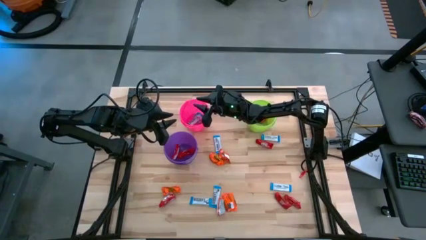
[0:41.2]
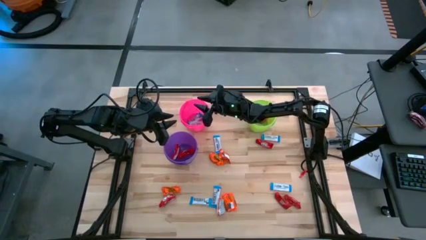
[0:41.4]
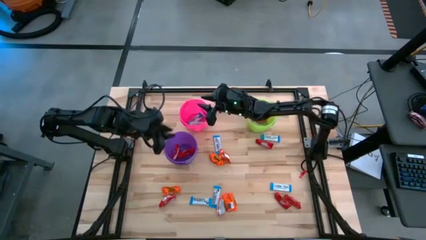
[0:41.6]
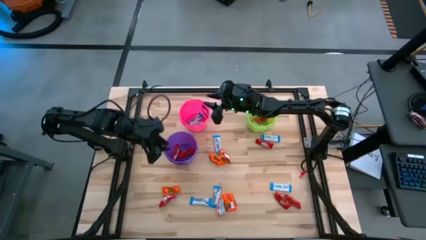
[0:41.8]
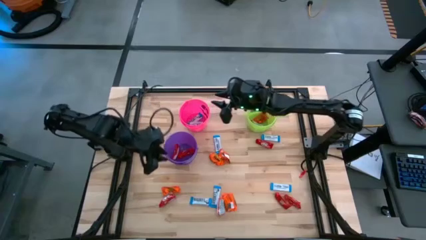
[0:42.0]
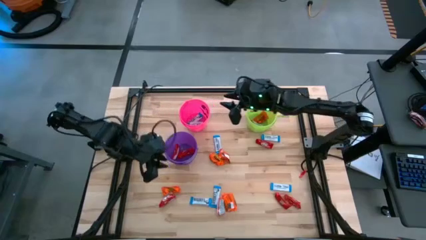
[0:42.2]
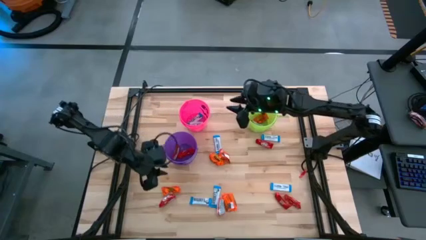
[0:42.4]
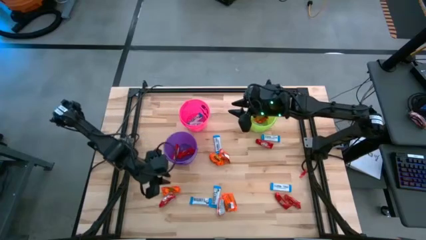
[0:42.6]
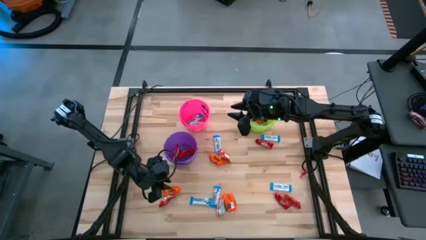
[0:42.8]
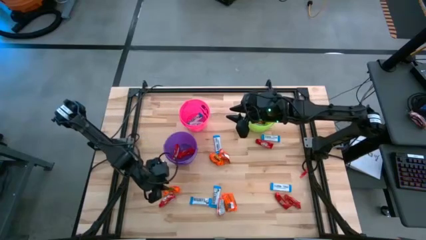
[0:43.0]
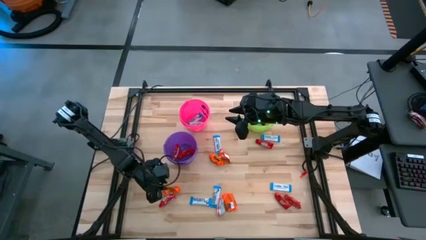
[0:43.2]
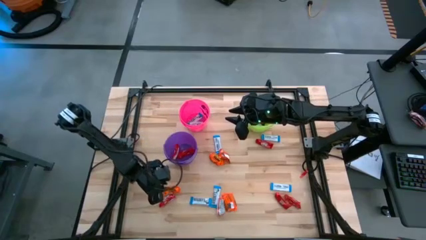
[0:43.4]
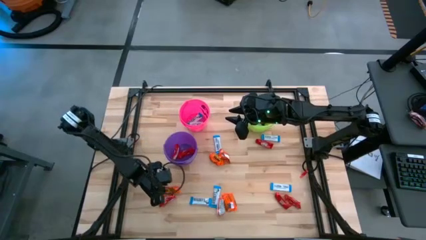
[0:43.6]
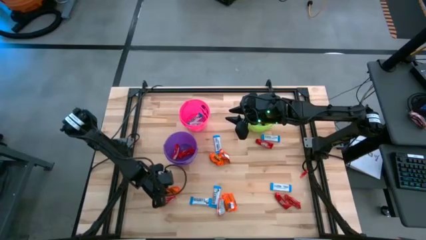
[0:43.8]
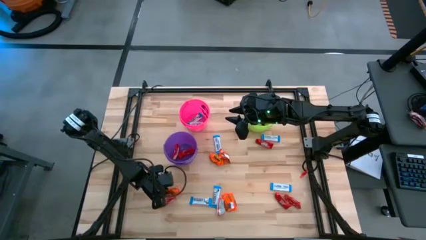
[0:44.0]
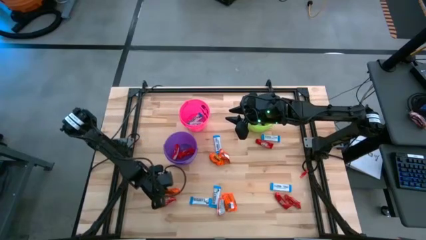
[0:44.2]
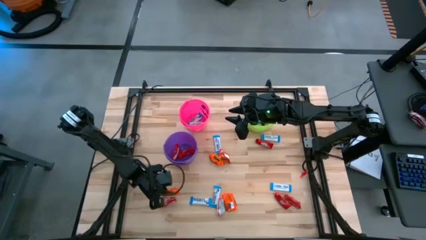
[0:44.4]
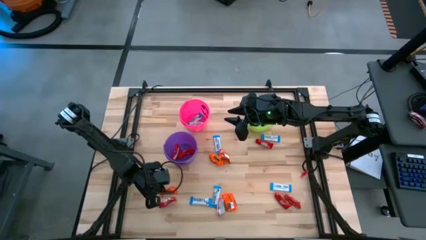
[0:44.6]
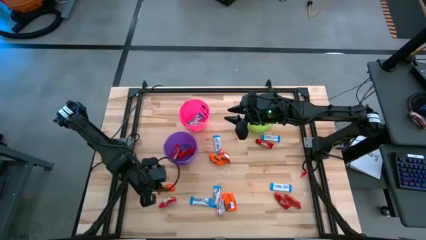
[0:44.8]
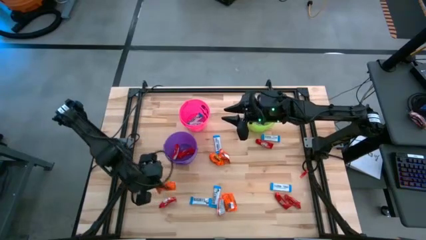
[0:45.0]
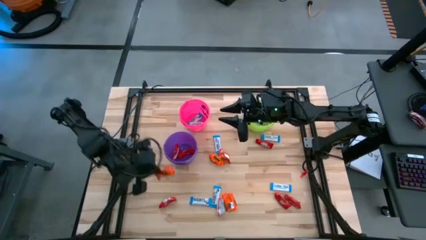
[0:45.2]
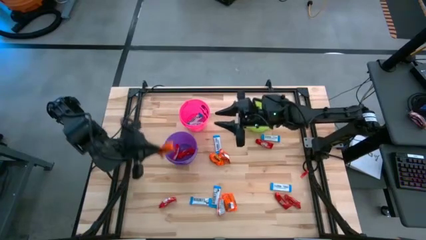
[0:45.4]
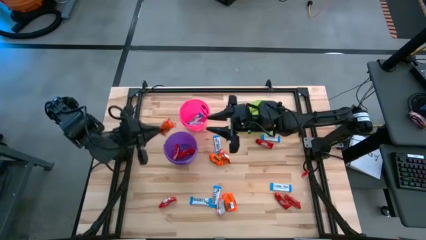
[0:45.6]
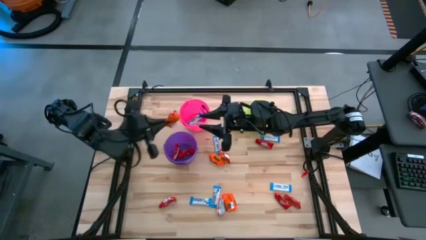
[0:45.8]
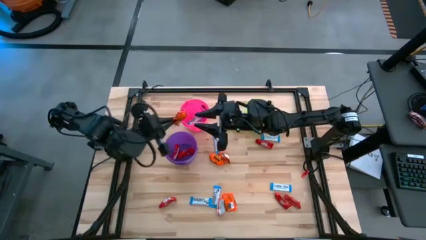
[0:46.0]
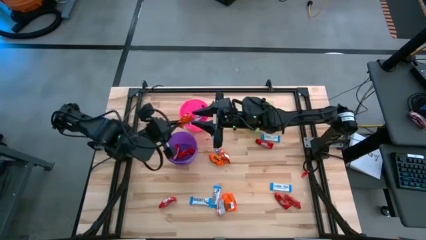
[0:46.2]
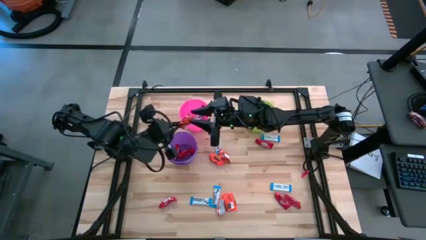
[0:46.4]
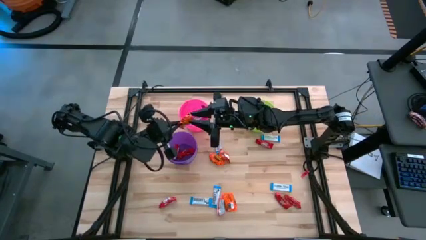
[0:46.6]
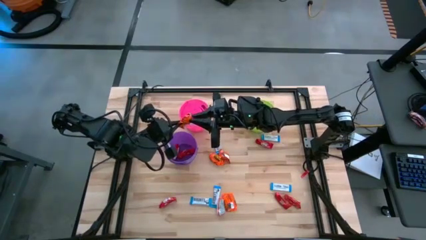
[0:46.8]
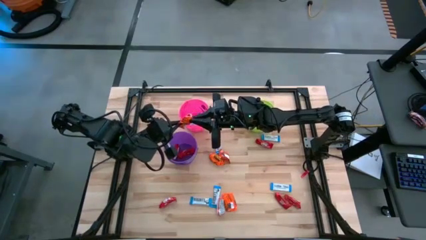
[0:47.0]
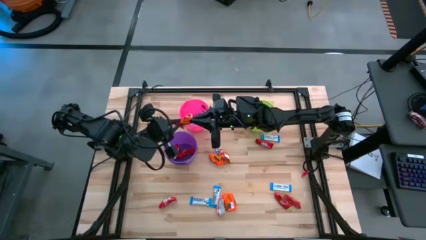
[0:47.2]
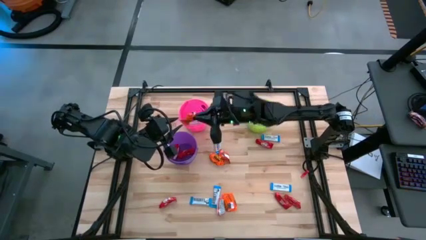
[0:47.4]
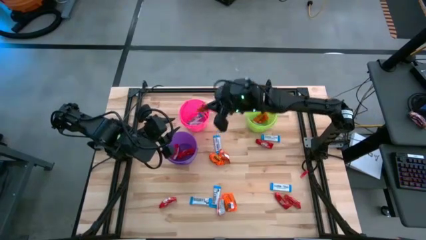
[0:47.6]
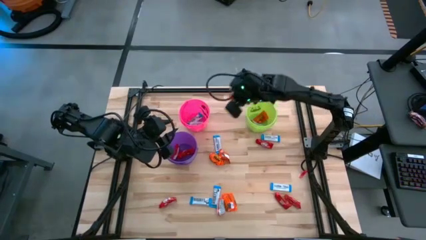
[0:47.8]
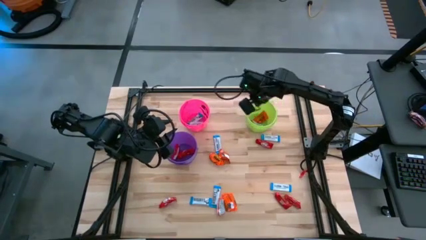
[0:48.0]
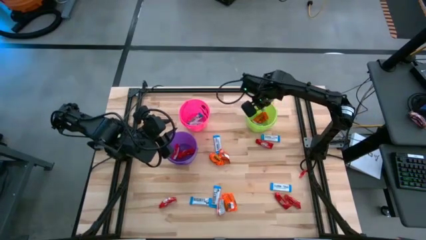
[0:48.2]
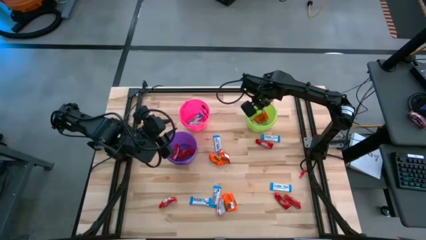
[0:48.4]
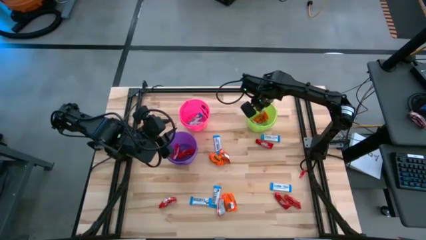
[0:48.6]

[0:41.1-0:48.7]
Task: Sort candy
Put the orange chocolate into the green bucket

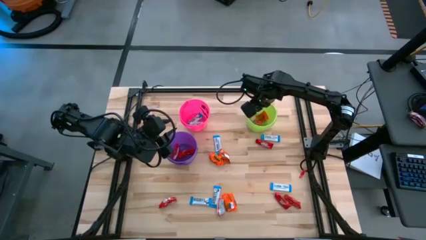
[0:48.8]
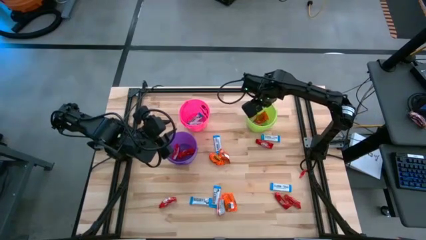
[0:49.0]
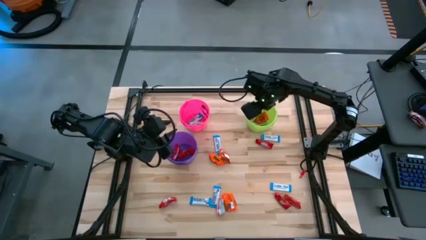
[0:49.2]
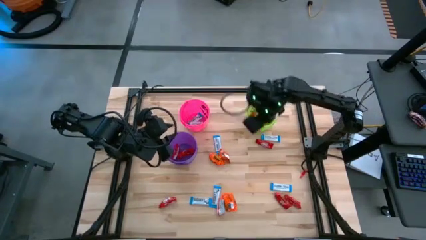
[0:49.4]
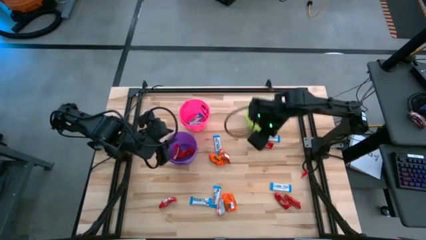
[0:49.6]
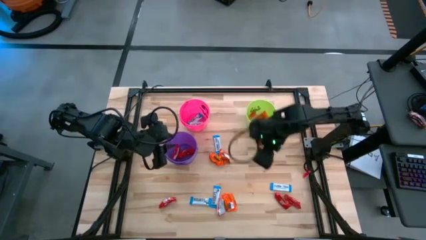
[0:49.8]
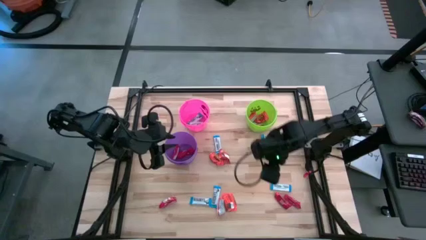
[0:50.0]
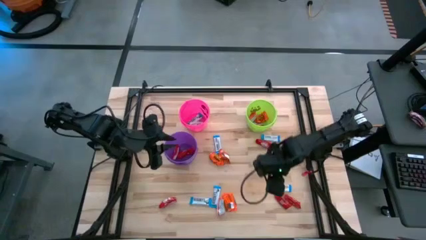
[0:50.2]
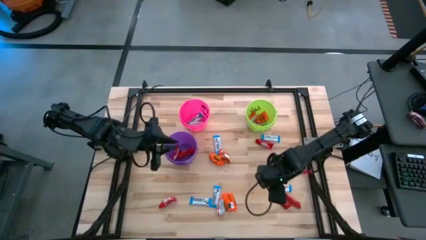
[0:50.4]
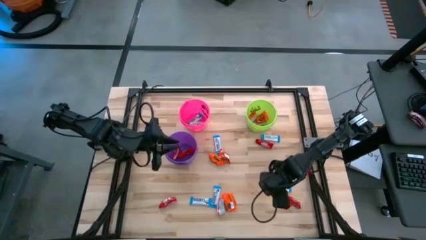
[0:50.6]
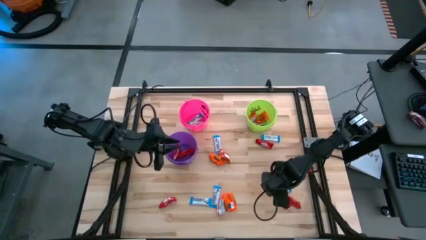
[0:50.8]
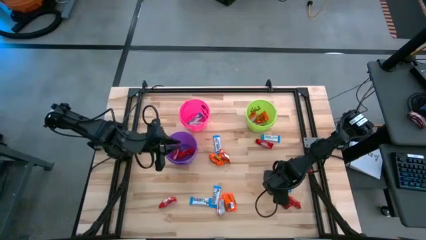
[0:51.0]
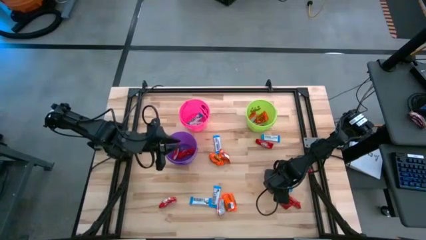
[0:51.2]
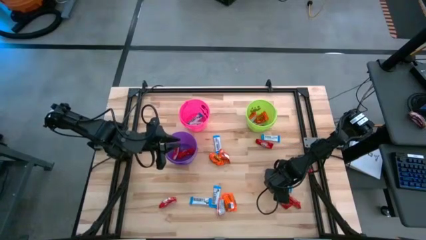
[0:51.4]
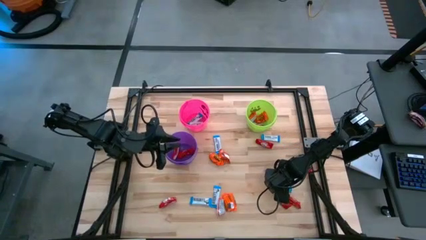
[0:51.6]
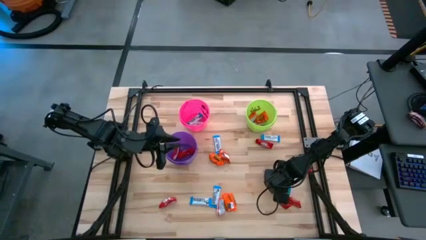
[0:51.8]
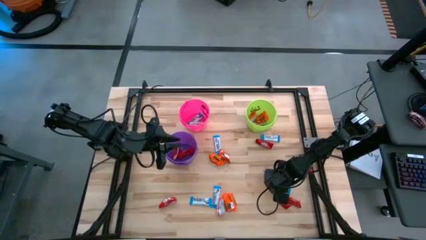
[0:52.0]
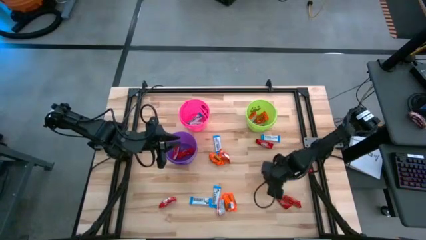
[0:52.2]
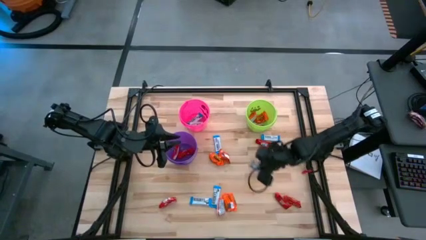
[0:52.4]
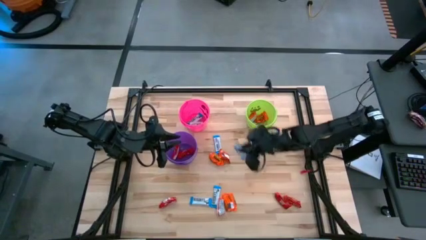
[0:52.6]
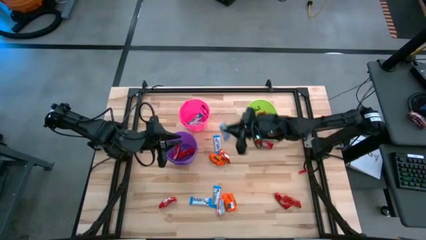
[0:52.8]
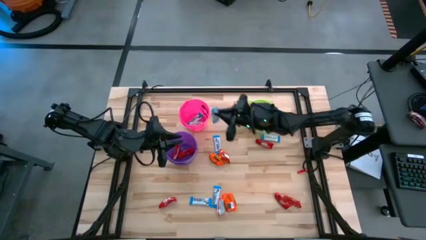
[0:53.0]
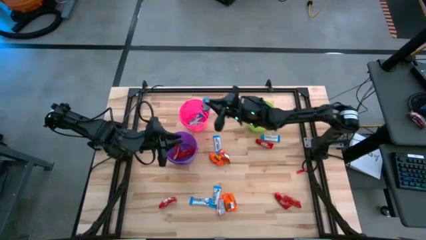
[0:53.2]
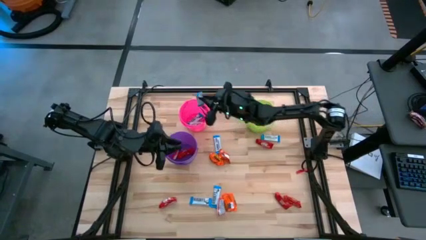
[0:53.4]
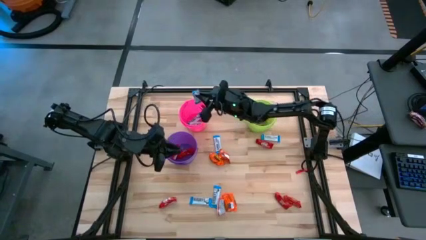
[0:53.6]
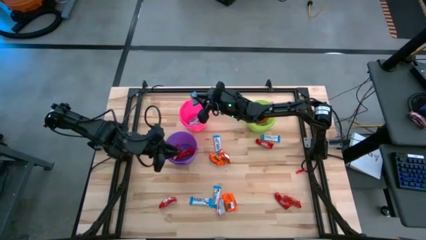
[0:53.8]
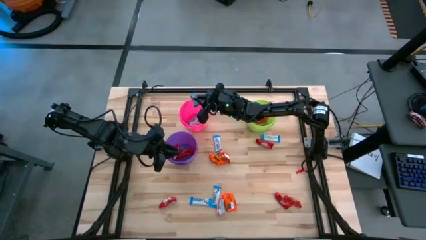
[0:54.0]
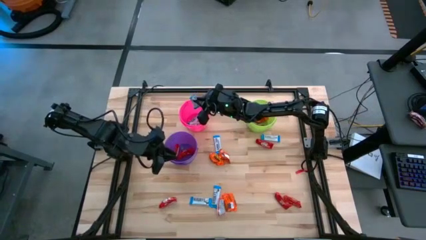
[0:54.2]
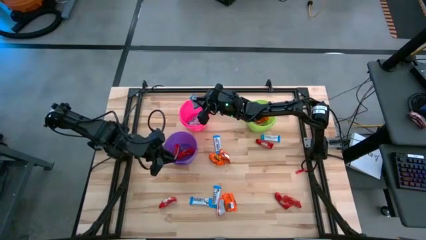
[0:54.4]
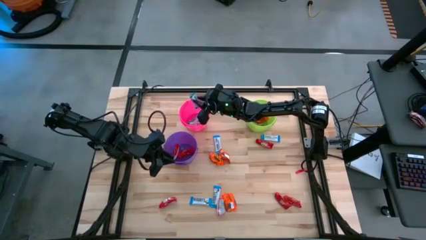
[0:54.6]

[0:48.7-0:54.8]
Put the white chocolate into the pink bucket

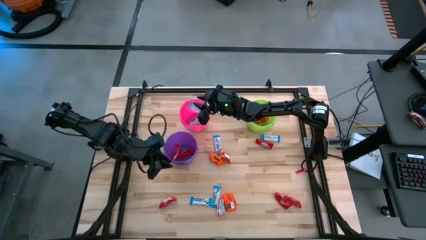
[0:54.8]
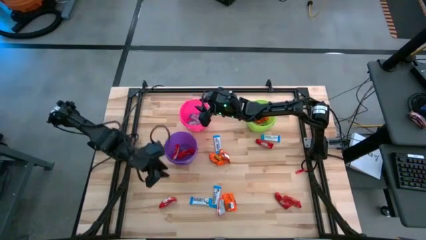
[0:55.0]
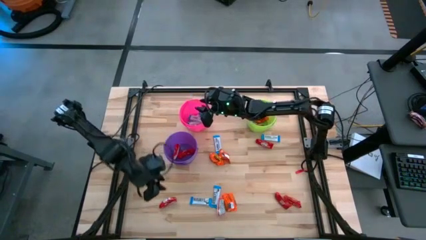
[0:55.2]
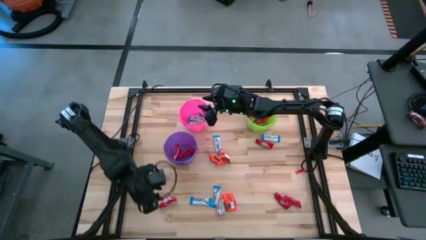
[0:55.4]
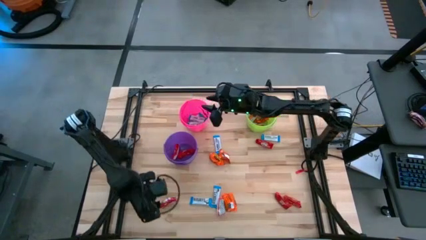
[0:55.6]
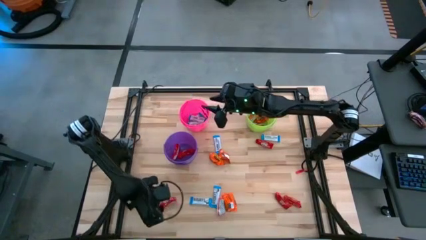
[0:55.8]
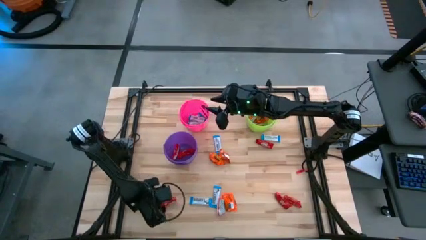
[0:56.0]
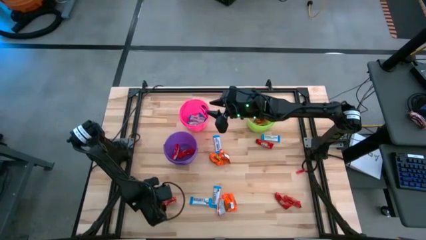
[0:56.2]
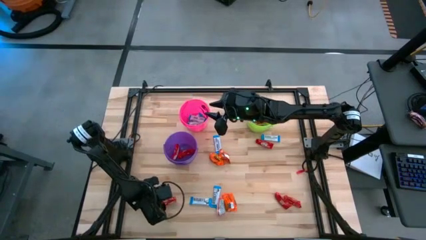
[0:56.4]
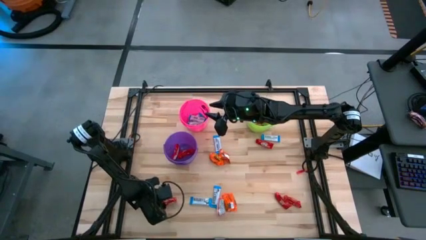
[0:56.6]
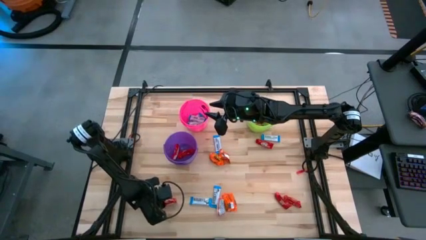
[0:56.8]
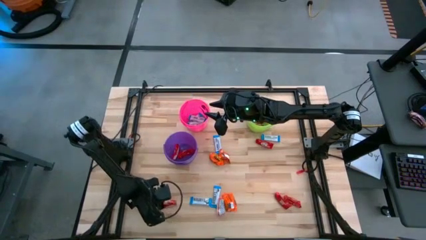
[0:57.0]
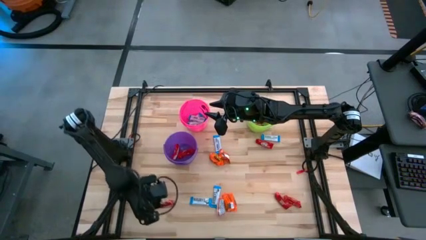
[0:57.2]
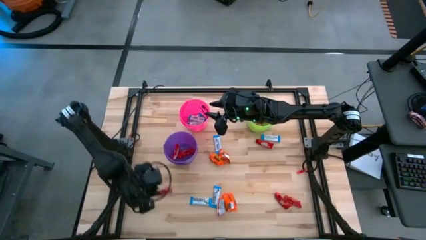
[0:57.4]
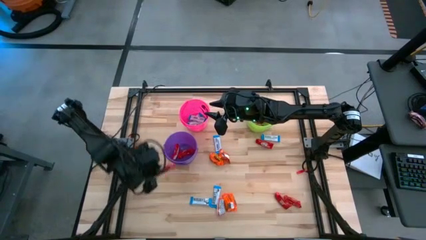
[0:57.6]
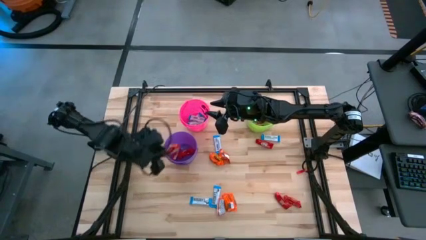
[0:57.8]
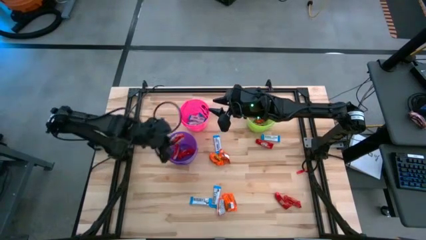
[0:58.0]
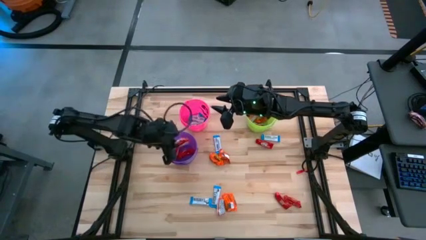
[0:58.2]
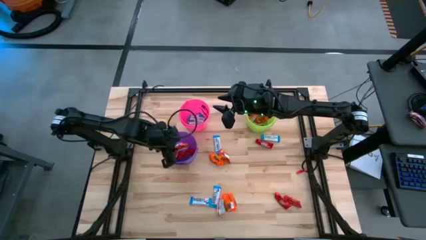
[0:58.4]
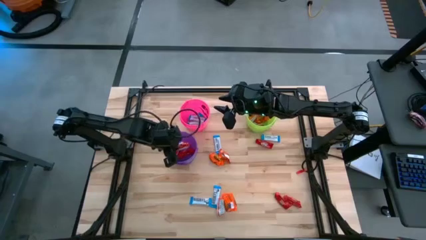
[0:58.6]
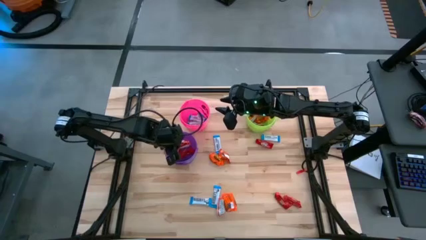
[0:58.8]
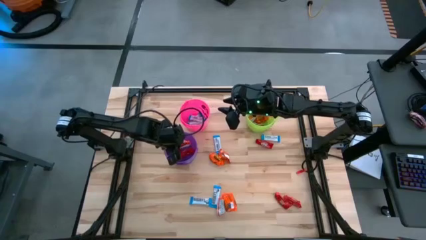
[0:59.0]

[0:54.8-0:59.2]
Put the red chocolate into the purple bucket
